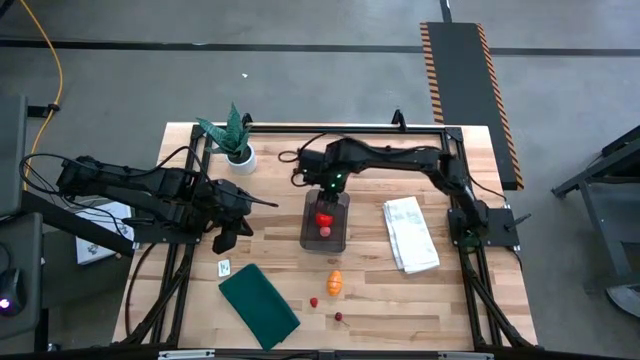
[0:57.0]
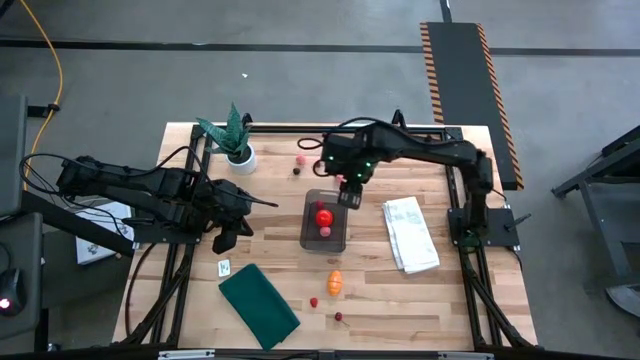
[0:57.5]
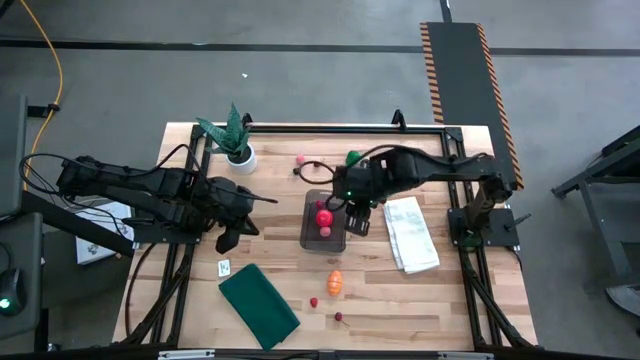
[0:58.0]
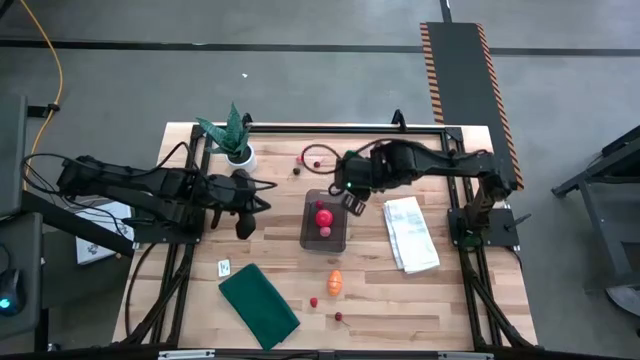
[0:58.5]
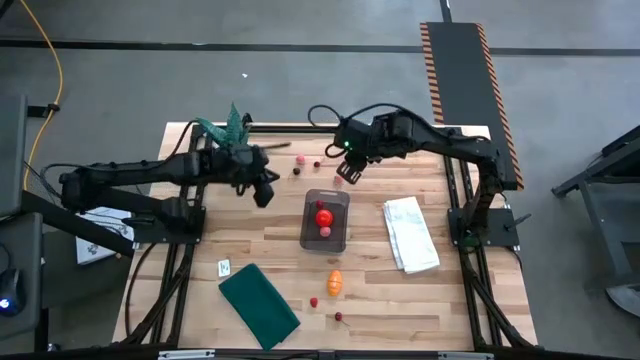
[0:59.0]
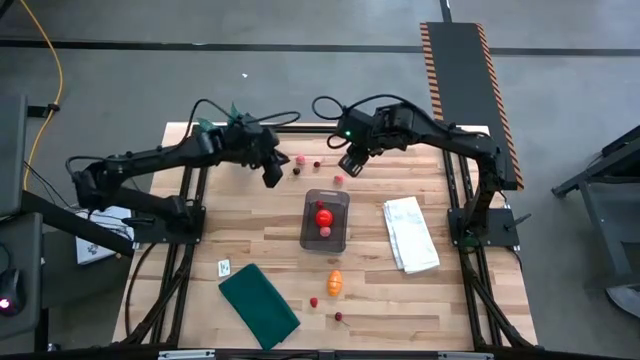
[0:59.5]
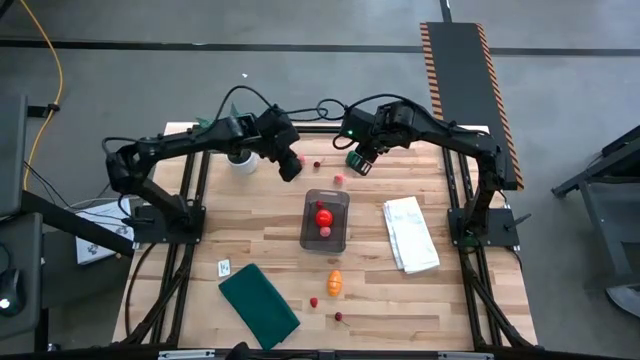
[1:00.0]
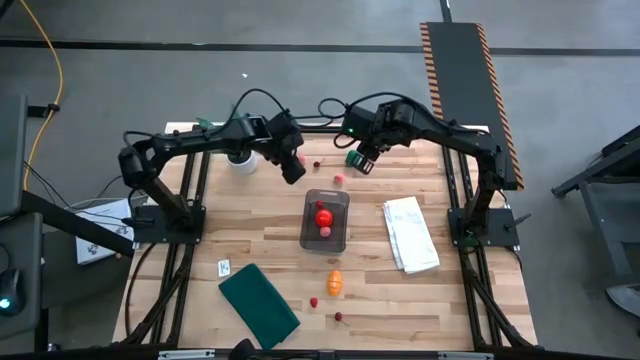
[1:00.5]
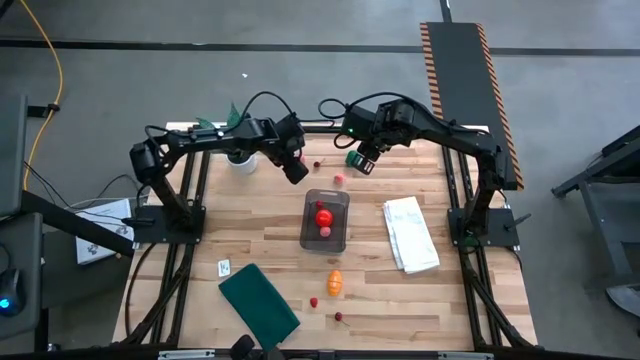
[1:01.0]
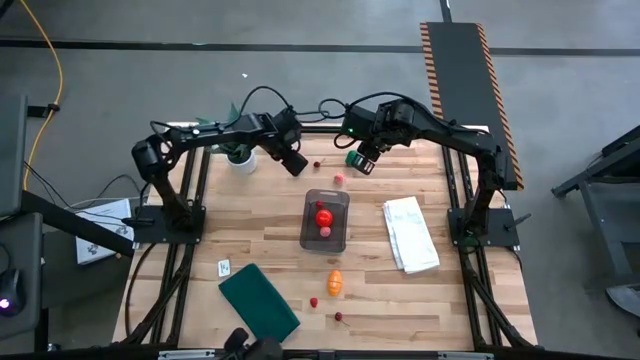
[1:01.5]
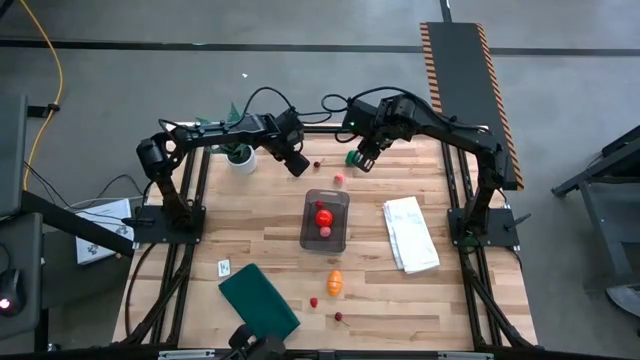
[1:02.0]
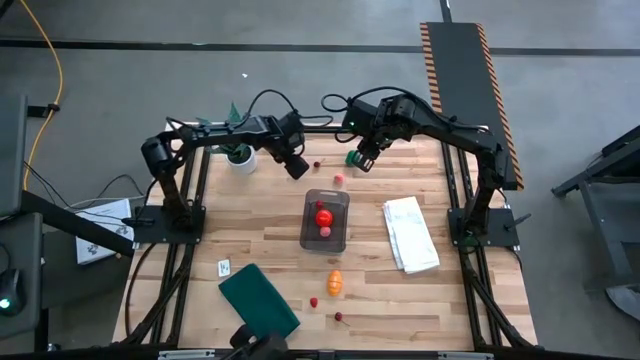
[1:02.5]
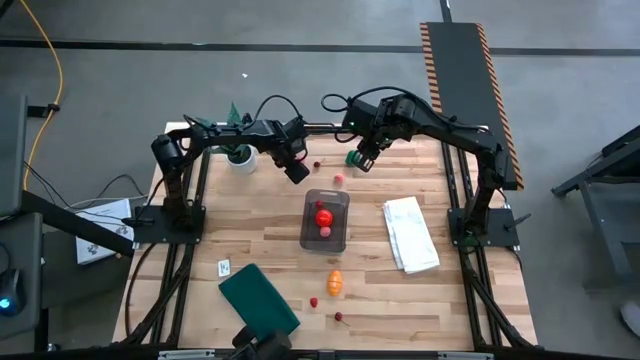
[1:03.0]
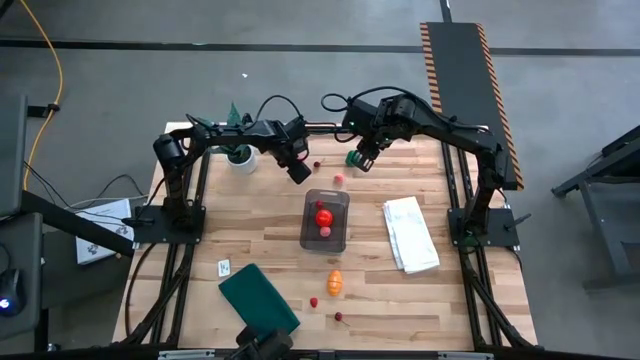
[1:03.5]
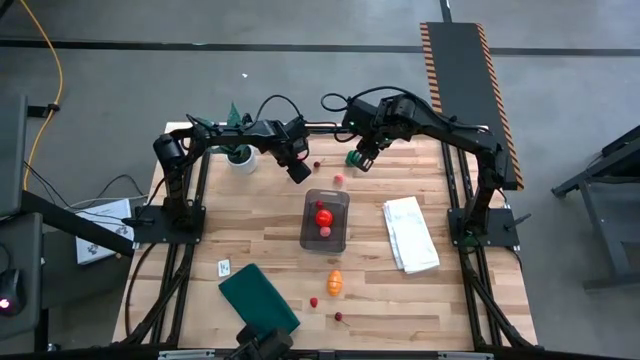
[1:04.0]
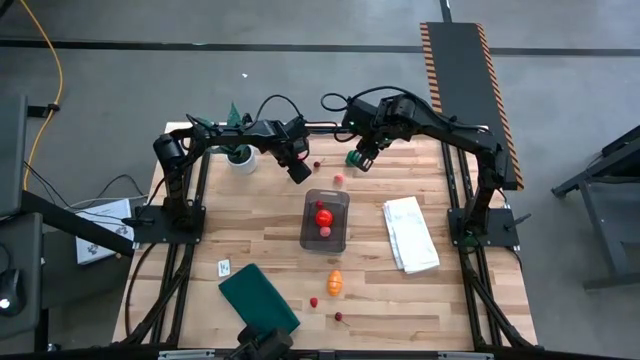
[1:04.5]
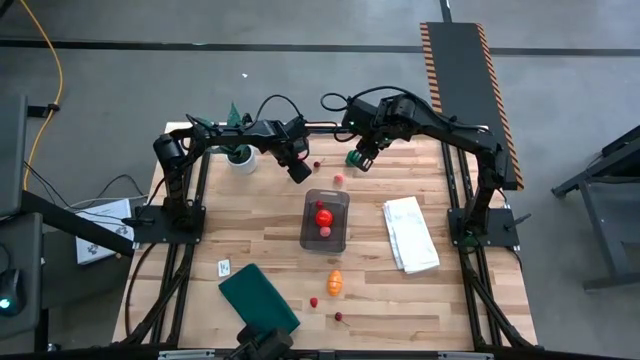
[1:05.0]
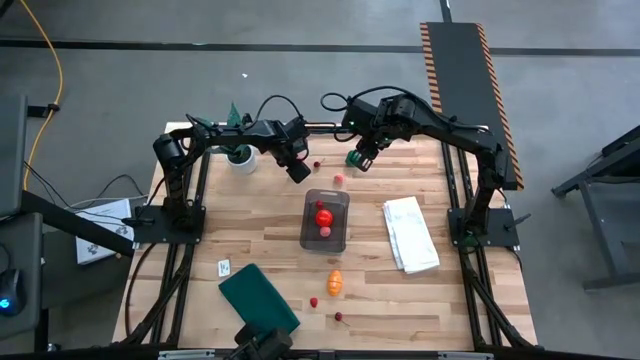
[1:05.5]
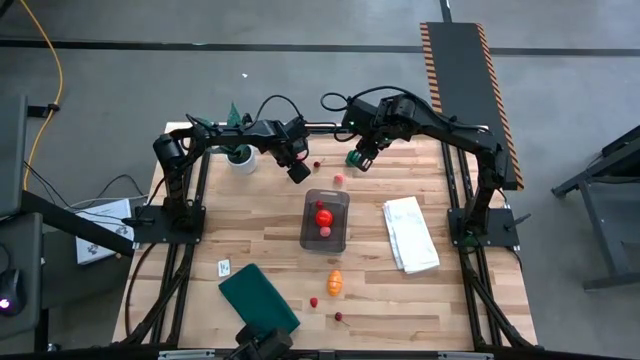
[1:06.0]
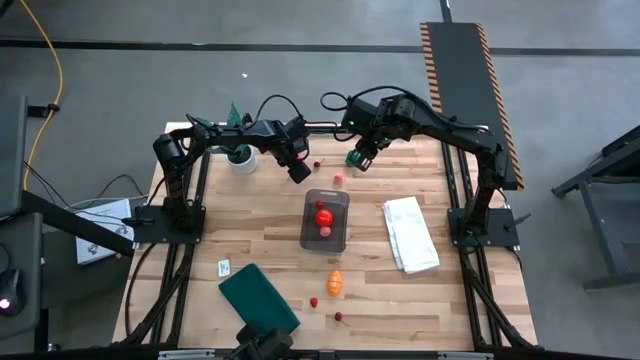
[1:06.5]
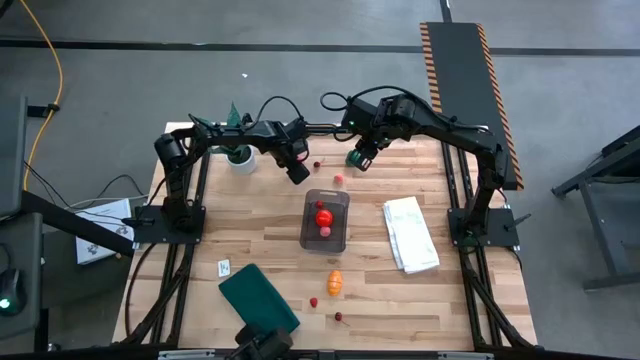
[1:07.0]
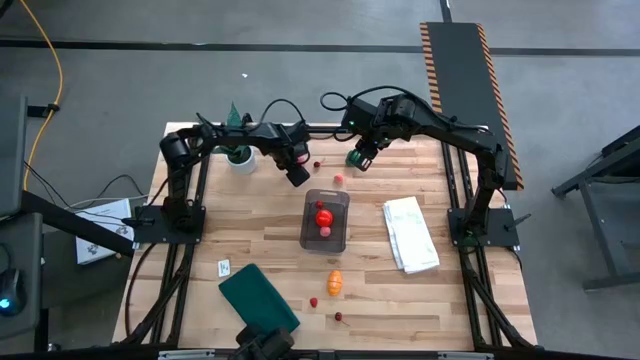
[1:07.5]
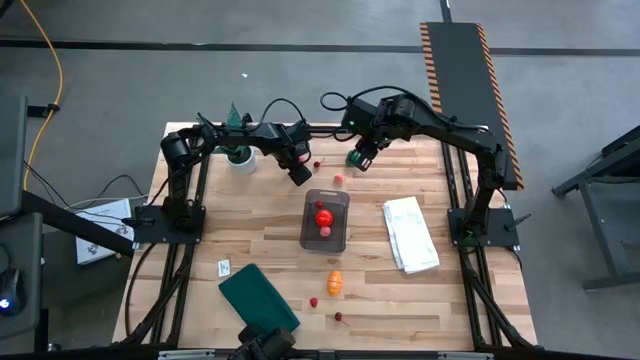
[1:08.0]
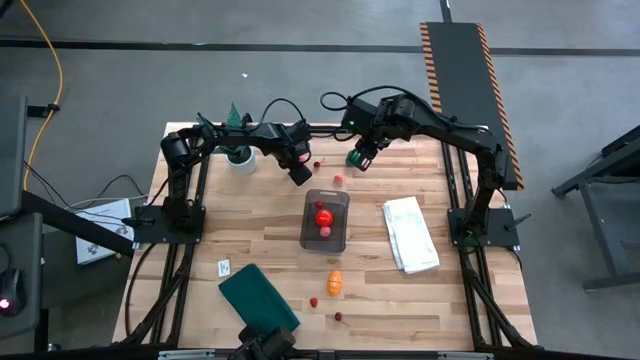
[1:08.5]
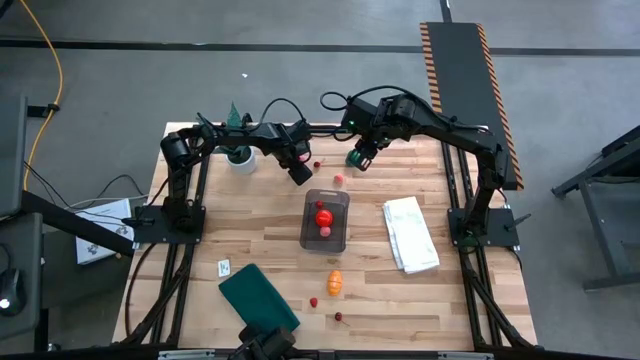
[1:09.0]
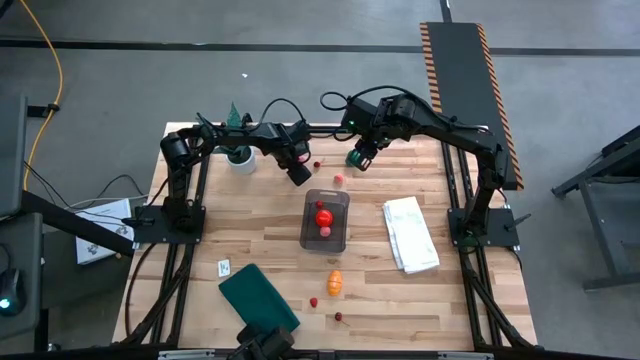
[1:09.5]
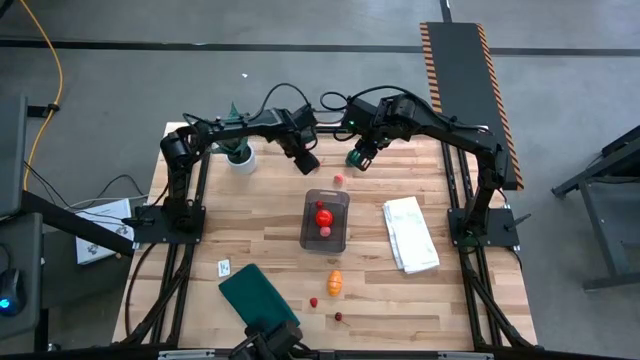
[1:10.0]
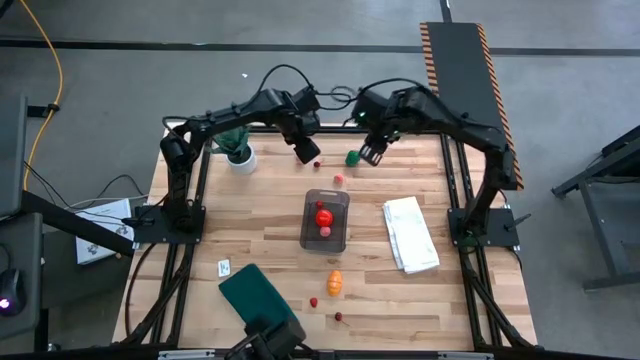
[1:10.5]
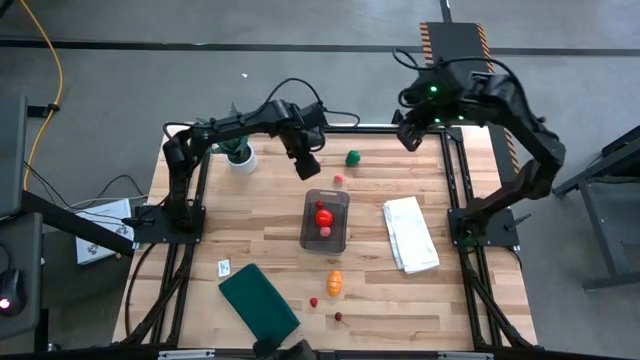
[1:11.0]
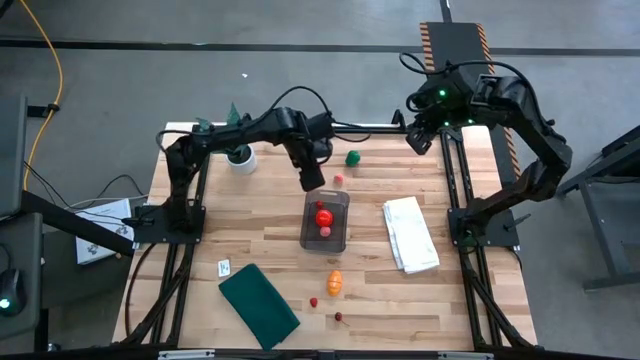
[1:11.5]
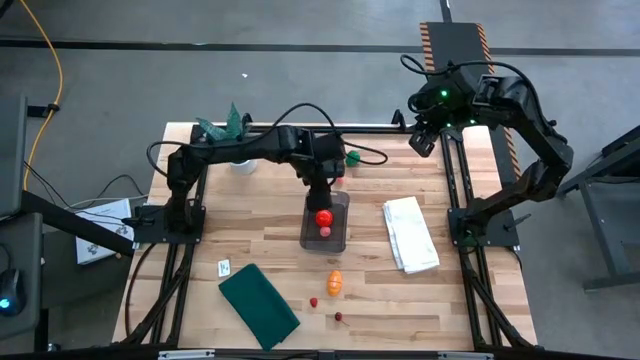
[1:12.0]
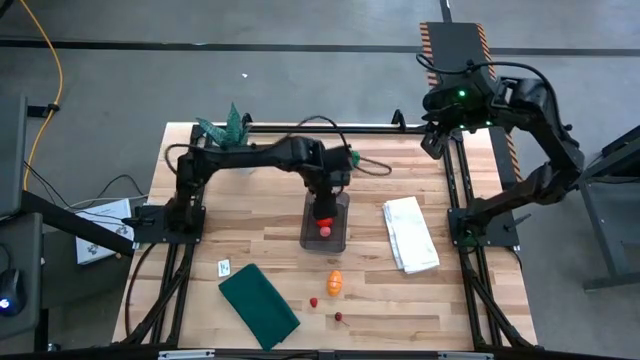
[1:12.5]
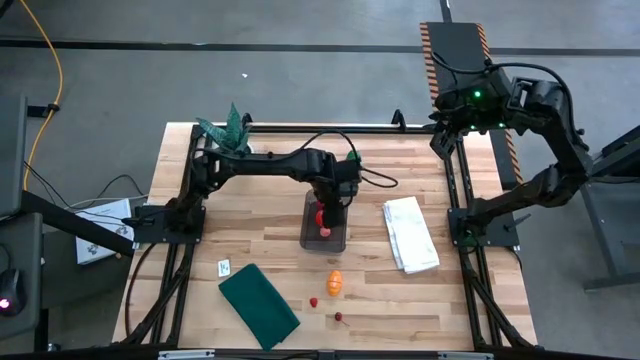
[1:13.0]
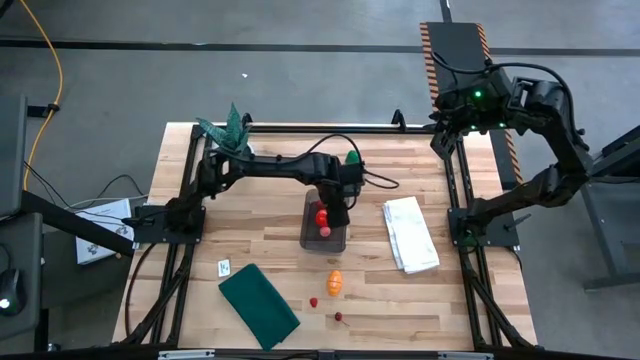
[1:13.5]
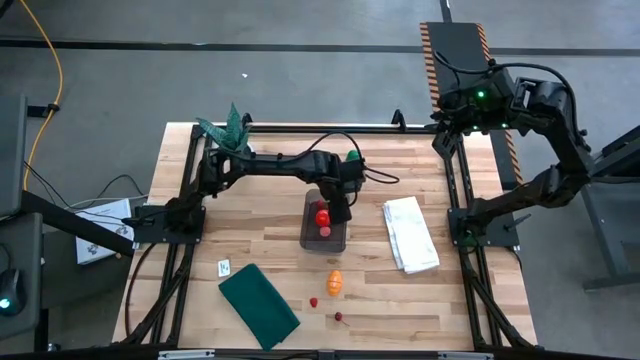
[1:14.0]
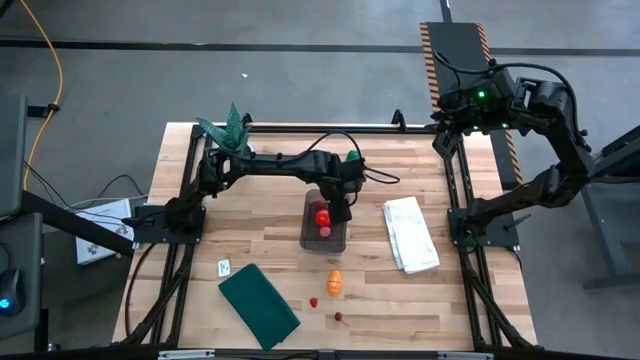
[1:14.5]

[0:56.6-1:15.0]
Task: Pick and placing Produce into tupperware
Put the black cherry into the transparent black bin
